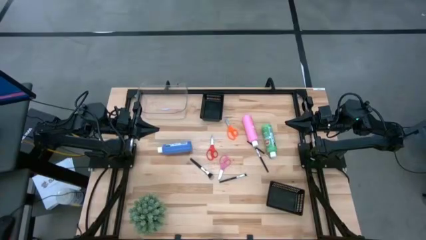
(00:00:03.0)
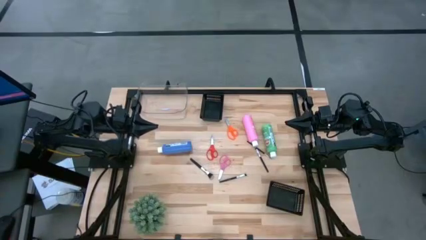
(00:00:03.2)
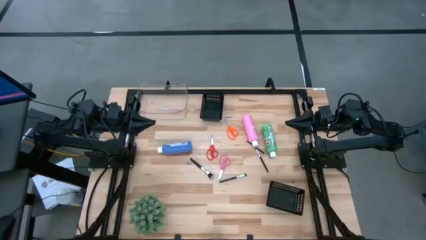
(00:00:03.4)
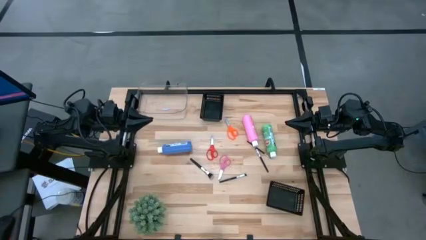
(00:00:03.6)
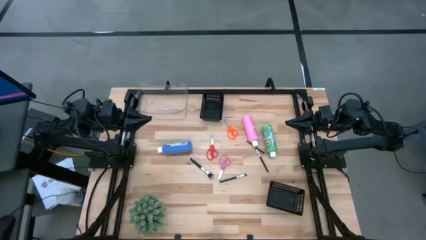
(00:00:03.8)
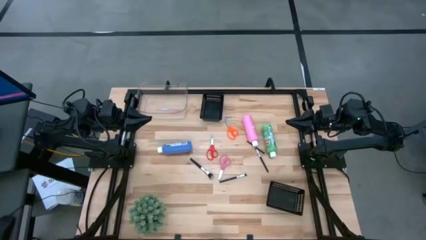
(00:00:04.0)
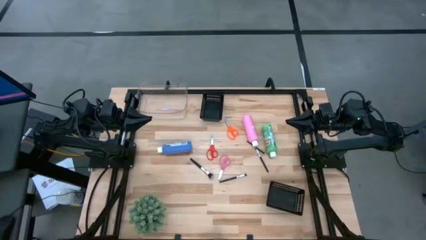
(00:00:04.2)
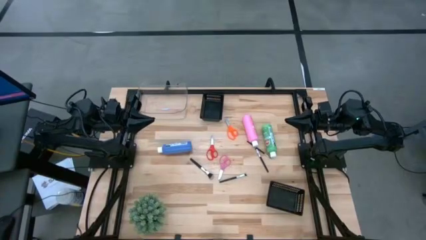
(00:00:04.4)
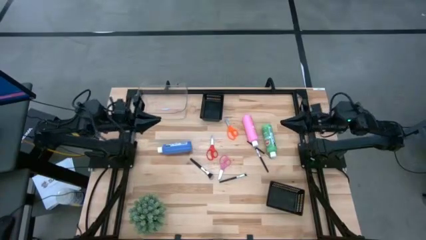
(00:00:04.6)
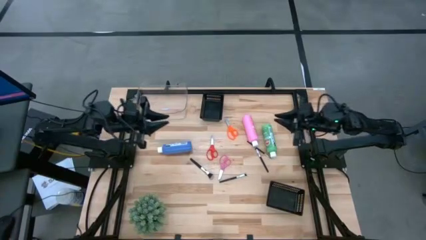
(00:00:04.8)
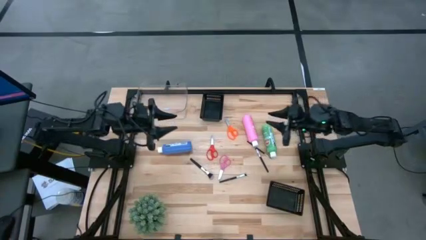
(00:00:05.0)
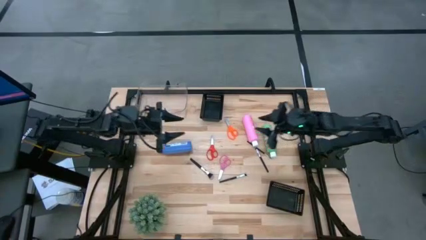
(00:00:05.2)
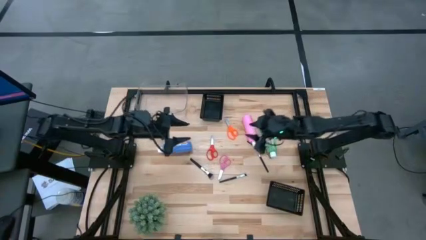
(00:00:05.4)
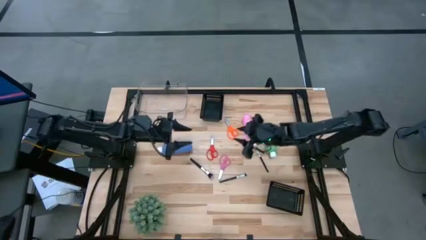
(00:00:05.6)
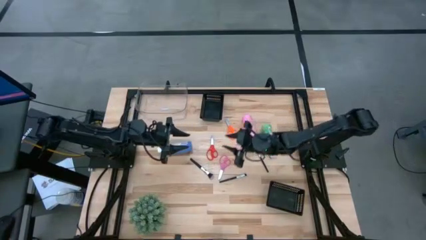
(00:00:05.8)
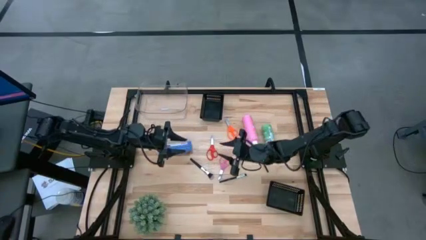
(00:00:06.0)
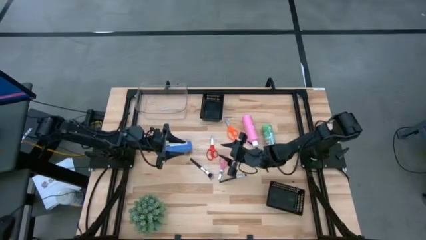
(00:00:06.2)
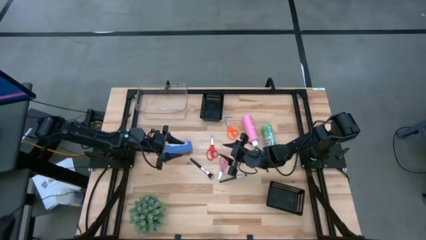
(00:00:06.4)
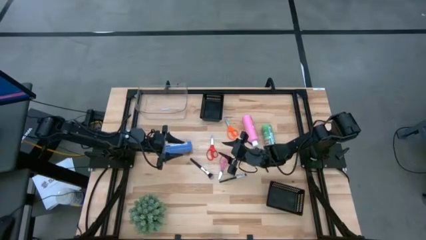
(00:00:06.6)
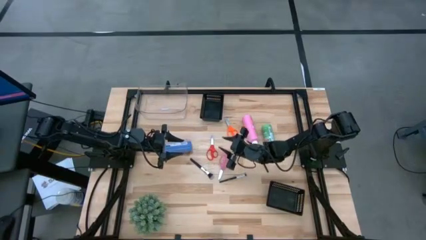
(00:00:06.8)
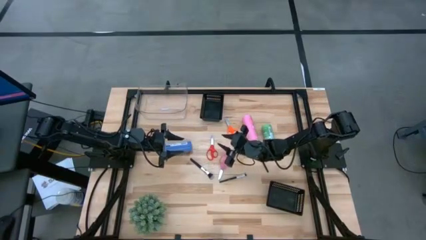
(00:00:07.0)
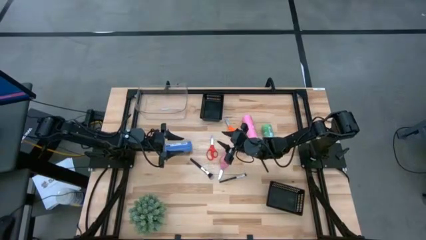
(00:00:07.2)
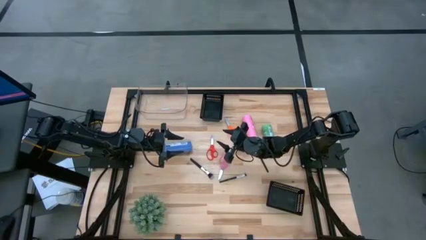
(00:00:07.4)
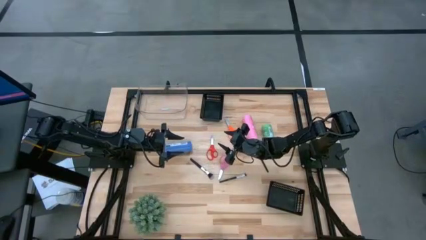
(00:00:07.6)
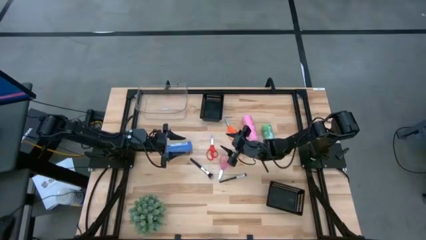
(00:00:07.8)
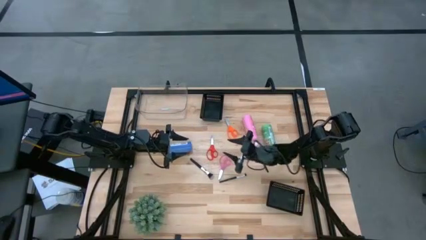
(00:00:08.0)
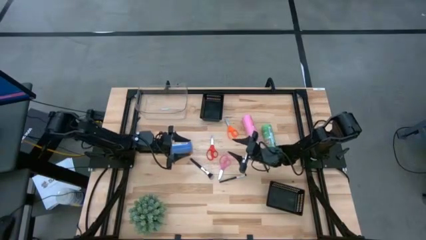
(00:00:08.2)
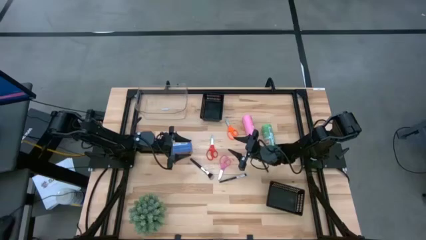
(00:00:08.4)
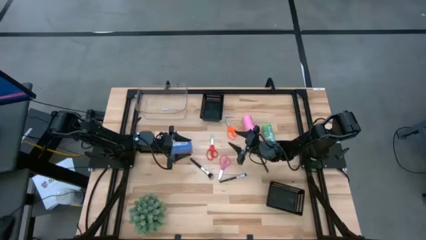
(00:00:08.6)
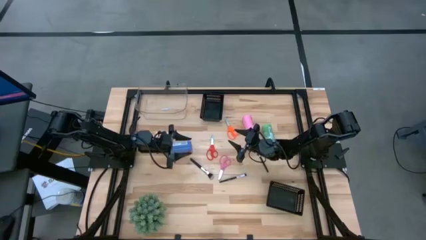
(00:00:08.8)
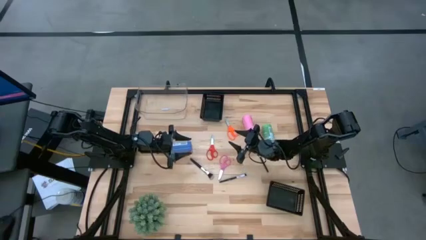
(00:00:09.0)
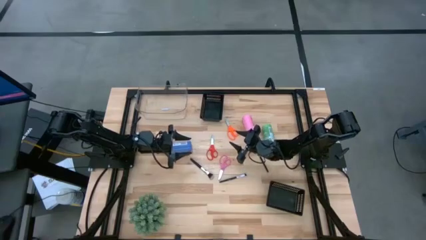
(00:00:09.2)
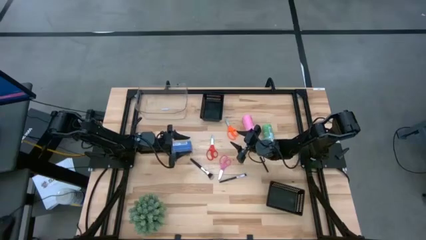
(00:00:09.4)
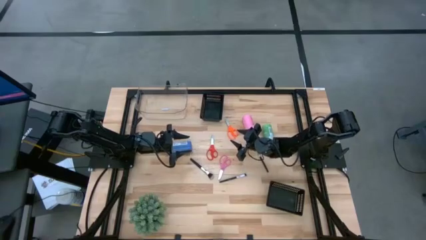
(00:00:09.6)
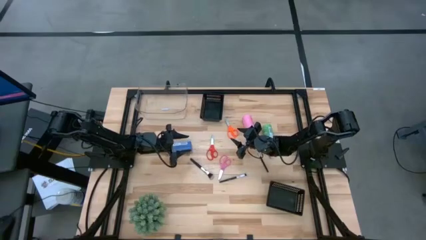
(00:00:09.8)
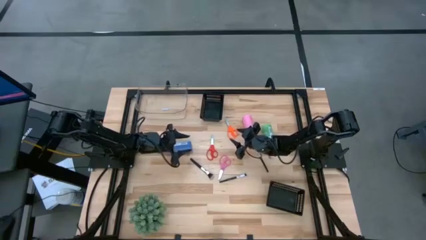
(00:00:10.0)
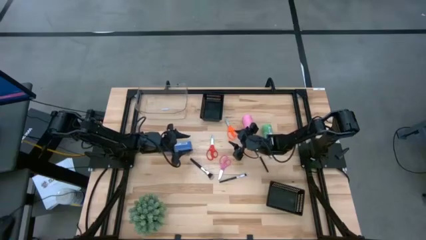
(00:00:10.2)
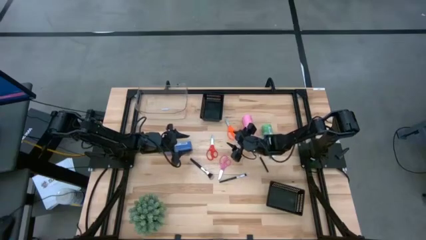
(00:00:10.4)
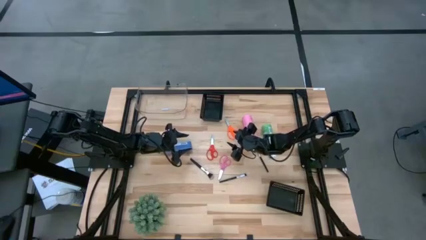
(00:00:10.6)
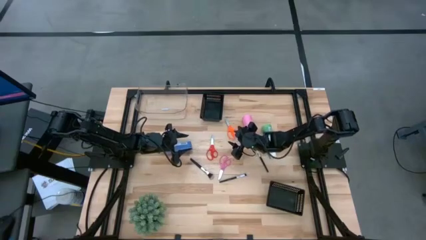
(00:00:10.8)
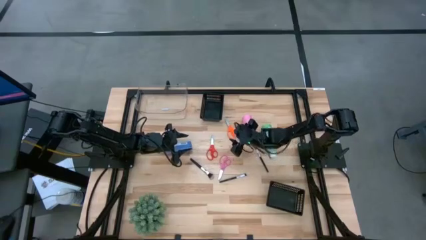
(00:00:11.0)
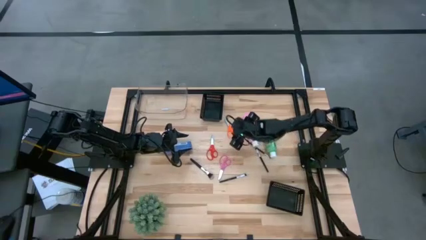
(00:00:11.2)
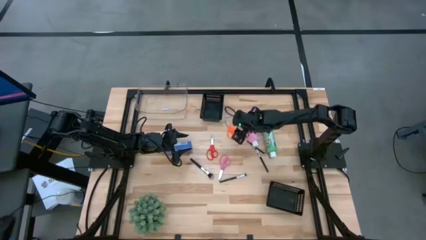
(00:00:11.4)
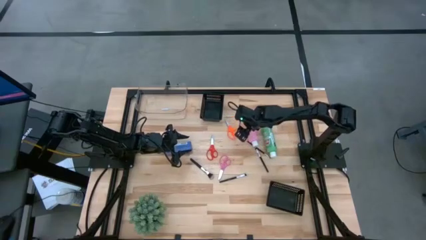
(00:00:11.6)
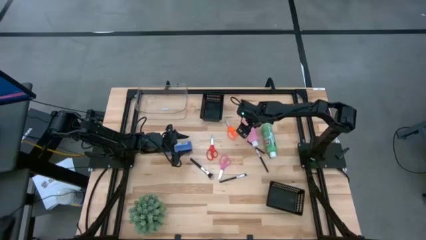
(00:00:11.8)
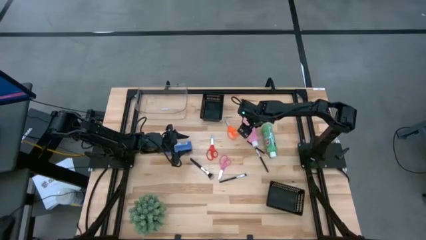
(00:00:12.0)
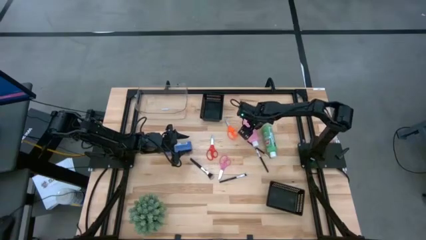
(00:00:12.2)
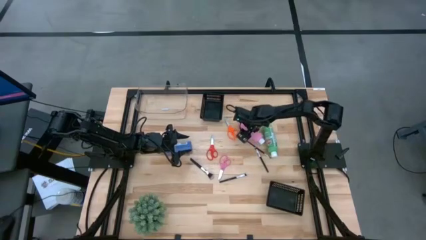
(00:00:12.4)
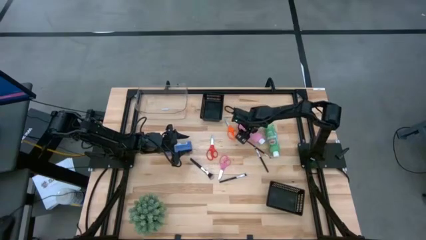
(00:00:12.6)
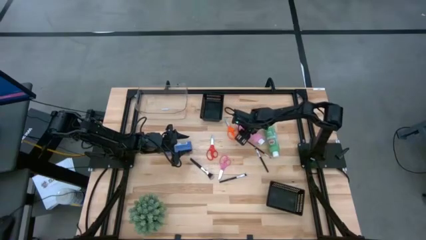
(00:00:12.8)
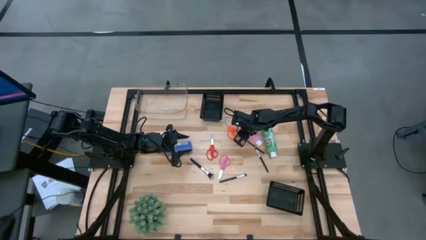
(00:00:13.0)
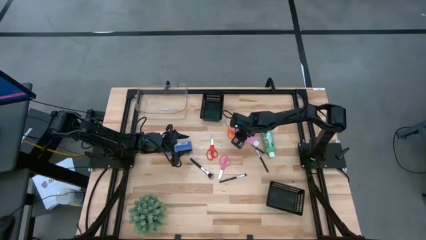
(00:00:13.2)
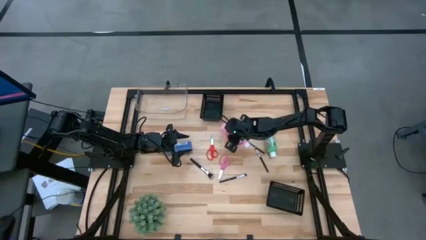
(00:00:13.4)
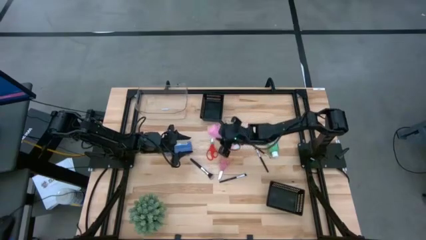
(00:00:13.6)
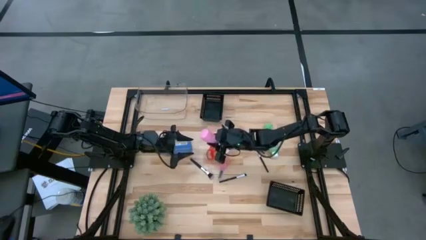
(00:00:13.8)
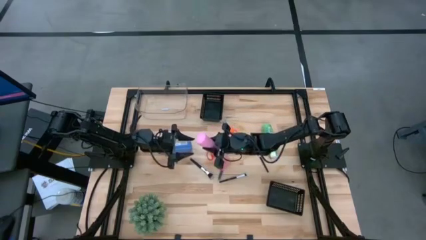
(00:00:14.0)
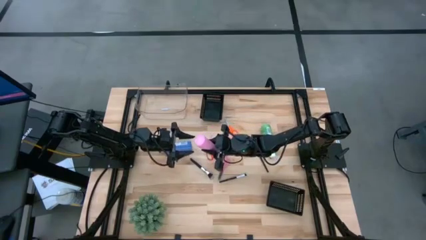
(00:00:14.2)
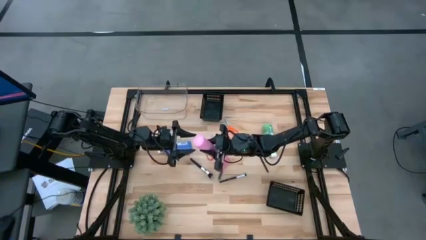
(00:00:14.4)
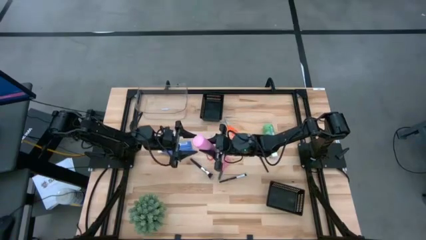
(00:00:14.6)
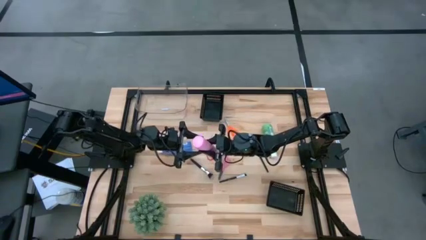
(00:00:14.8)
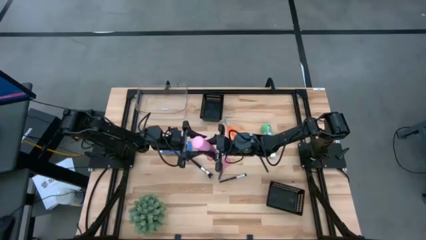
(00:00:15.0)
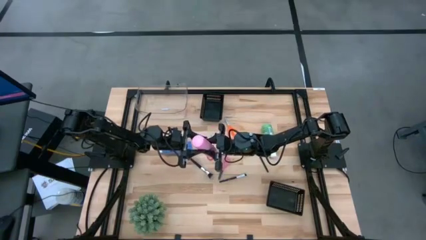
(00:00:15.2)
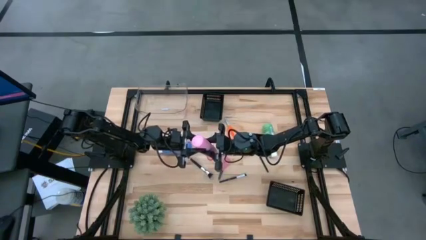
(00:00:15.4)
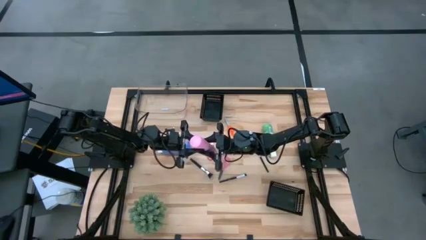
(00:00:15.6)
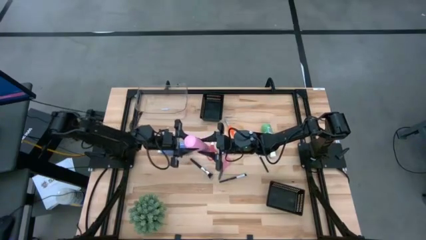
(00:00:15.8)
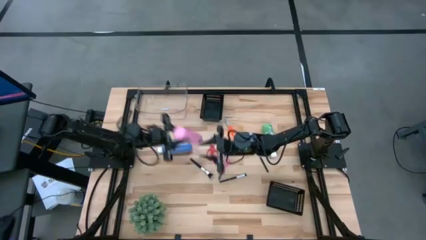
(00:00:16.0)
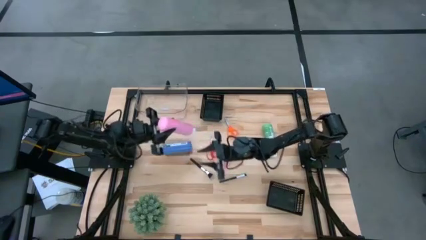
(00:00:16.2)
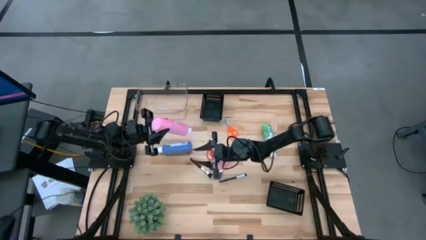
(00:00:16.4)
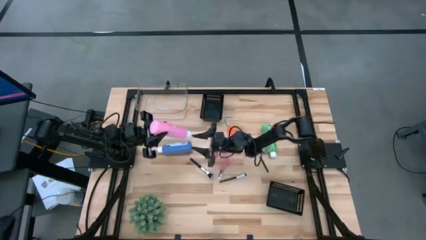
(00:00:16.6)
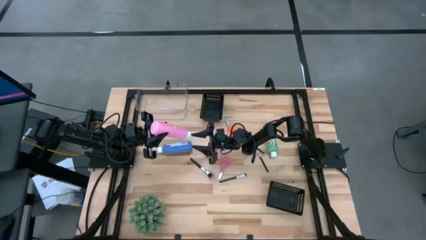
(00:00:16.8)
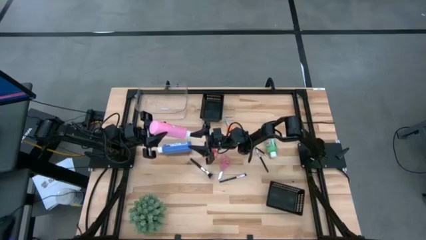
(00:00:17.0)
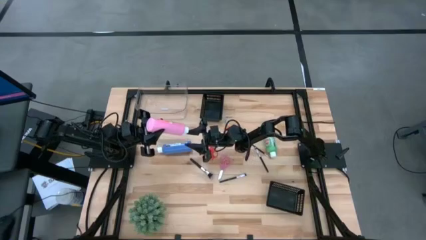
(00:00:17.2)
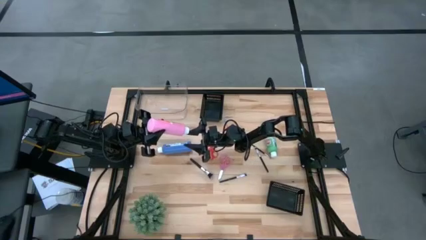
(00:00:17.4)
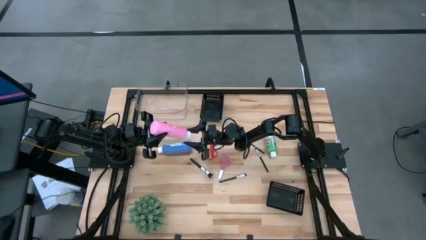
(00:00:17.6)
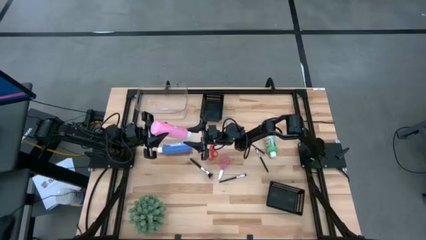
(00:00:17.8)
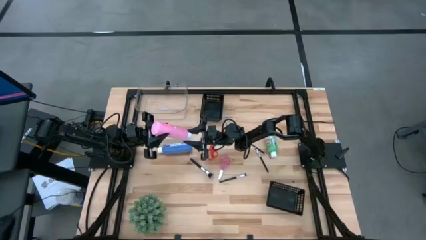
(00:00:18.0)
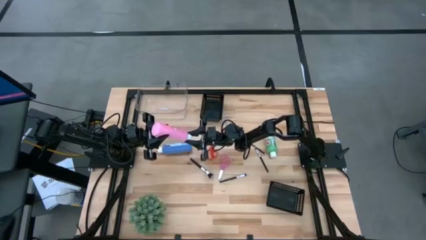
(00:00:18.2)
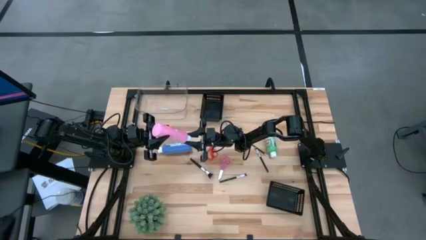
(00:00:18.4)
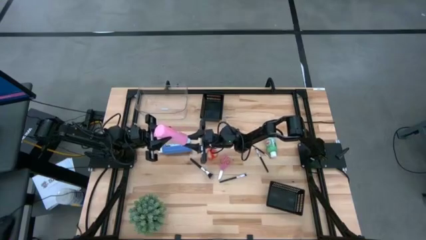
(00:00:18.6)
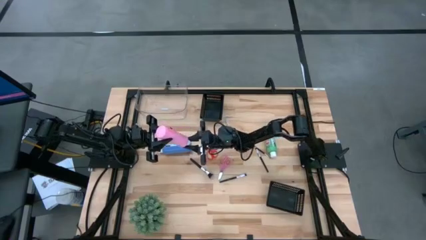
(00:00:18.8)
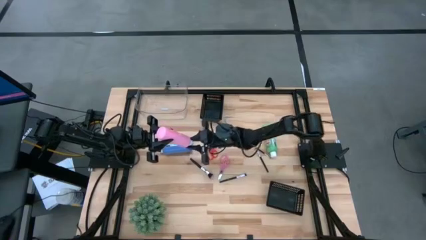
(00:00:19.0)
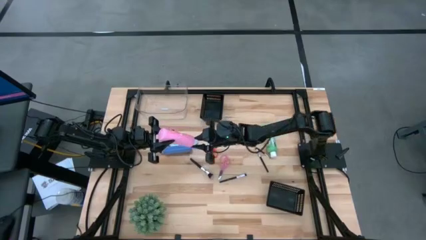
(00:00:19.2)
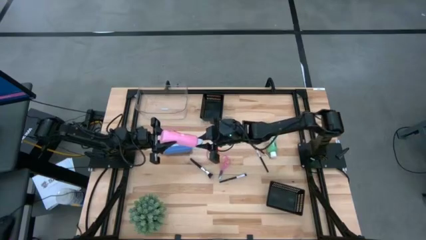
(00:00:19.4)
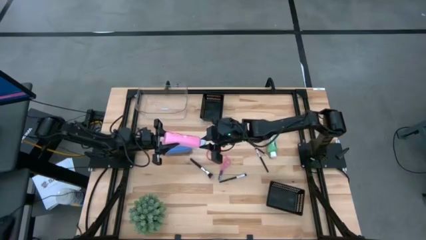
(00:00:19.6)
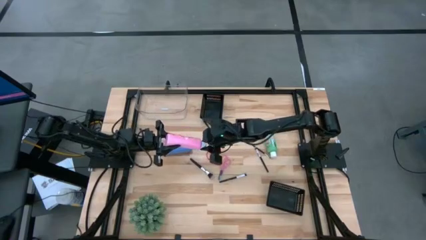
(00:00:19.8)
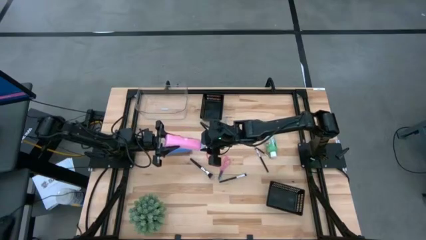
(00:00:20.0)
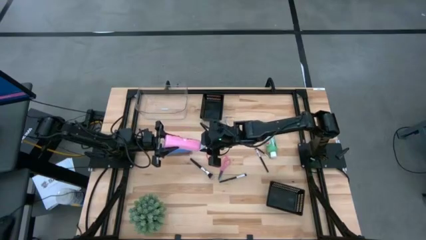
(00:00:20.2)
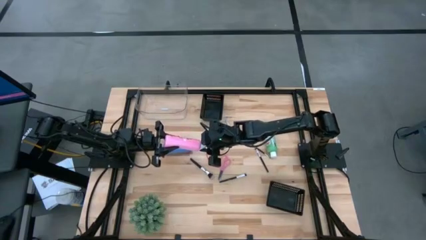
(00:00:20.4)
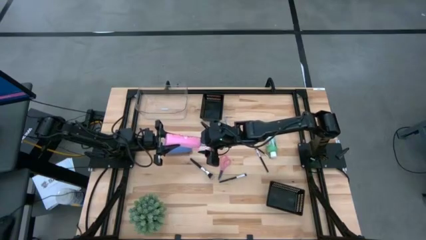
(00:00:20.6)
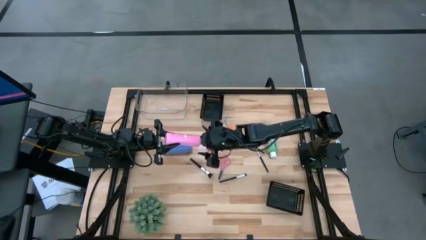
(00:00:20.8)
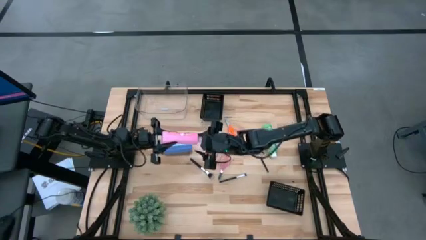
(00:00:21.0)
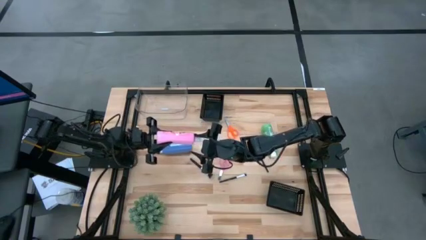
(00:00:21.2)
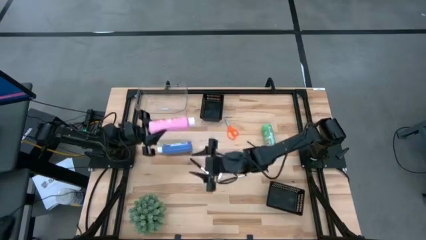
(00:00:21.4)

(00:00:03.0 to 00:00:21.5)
Task: Pick & Place Paint Supplies
Put the pink paint bottle into the transparent bin
